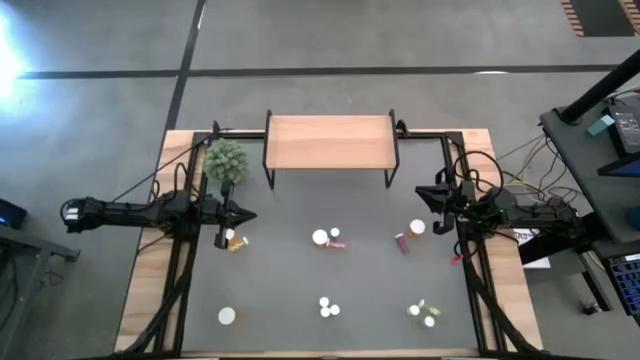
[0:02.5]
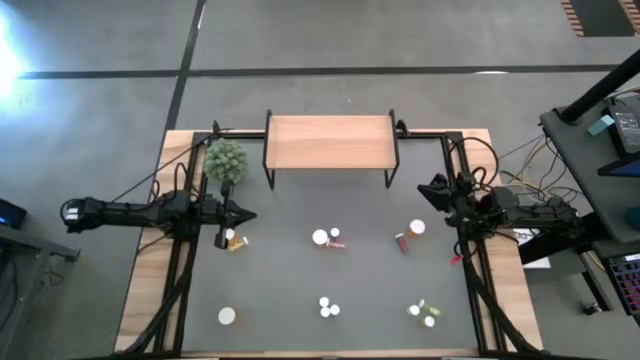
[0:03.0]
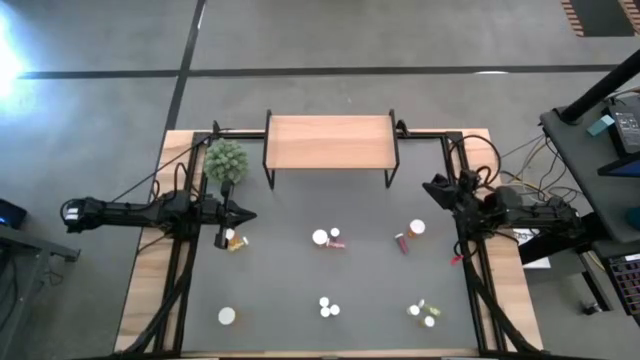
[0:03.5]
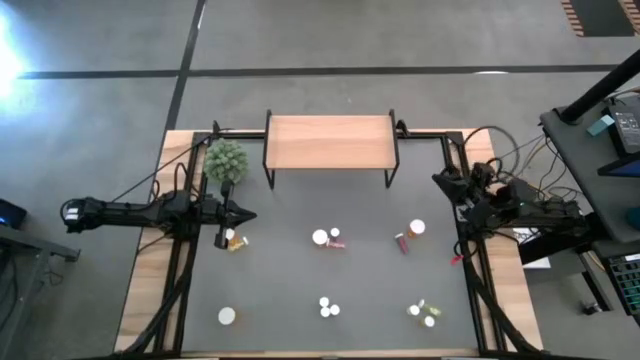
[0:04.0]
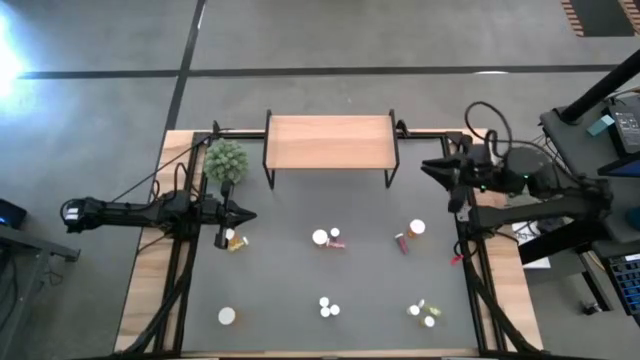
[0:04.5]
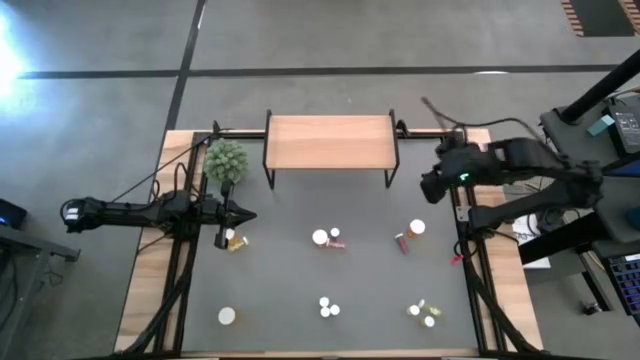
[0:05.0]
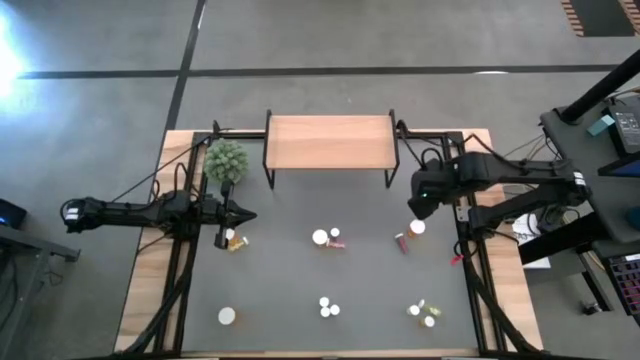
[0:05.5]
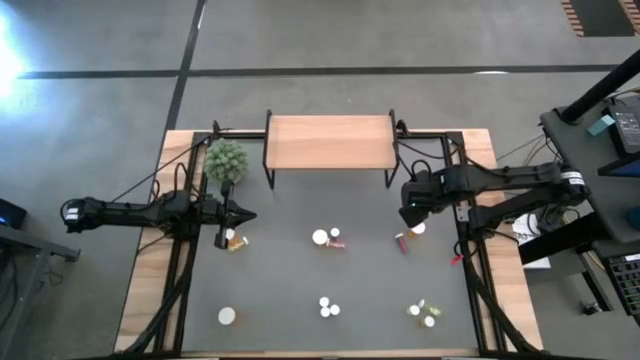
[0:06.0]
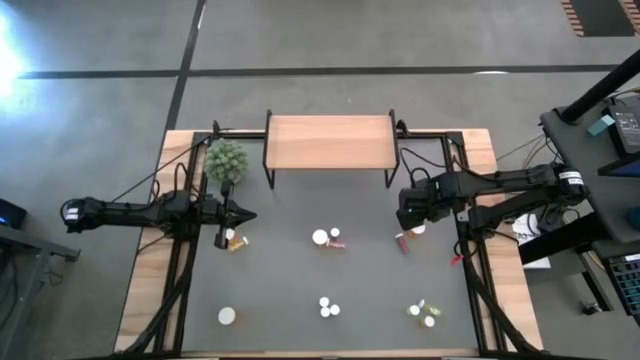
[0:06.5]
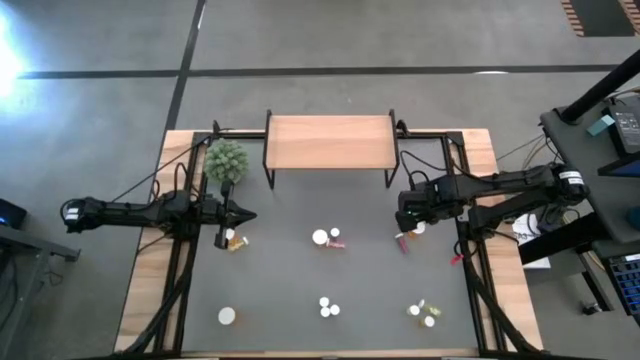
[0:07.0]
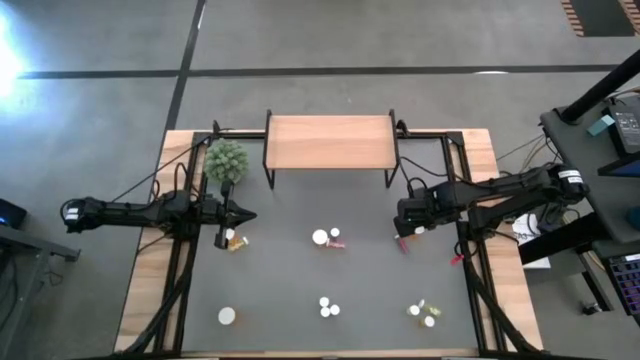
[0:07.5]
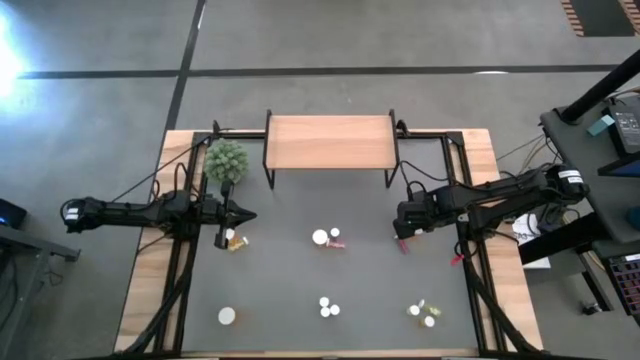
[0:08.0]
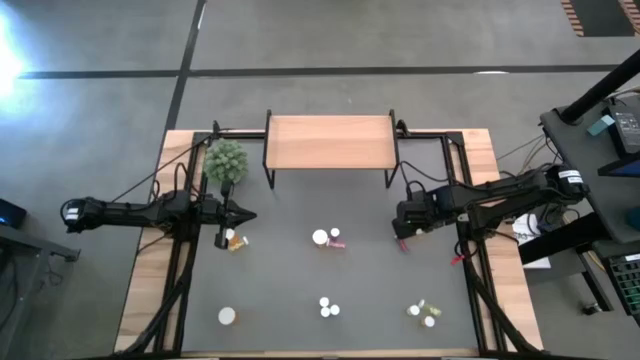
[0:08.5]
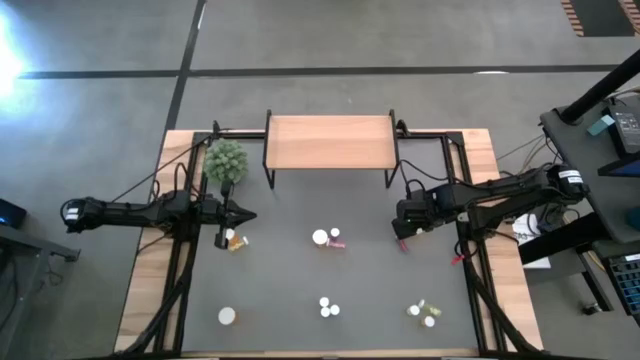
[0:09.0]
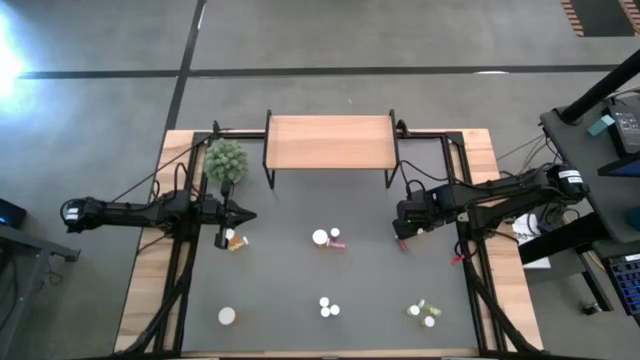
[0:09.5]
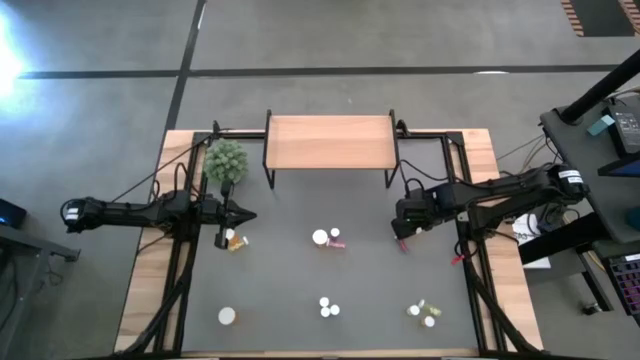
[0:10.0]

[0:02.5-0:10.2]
Task: Pick and place medicine bottles onto shelf by color
Put the large orange pill bottle on the shelf

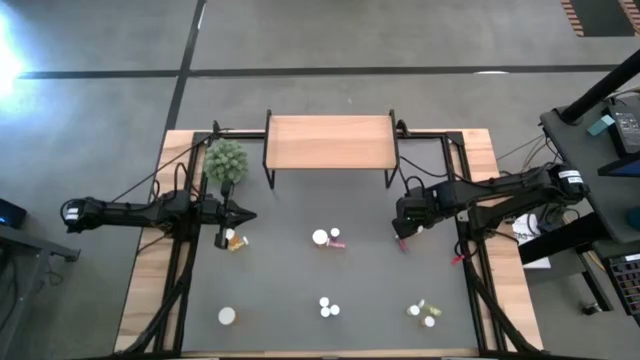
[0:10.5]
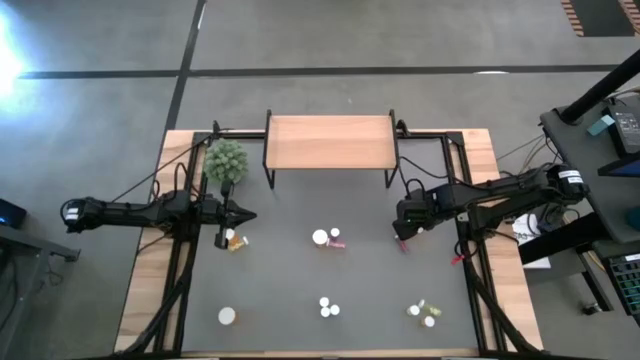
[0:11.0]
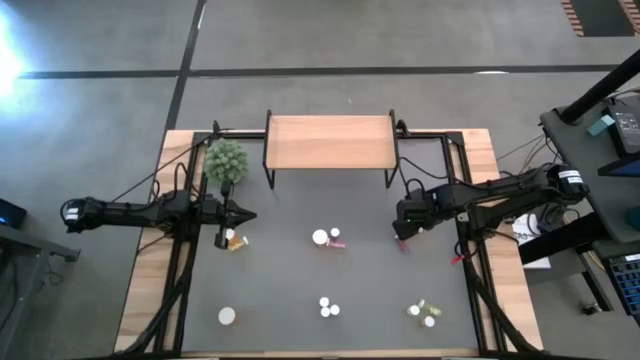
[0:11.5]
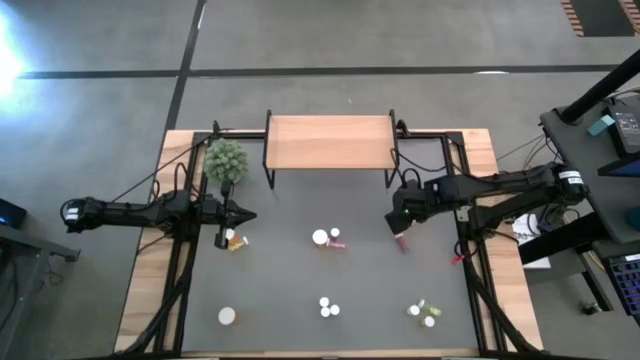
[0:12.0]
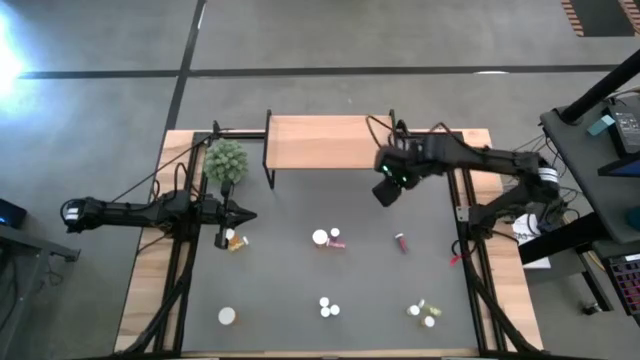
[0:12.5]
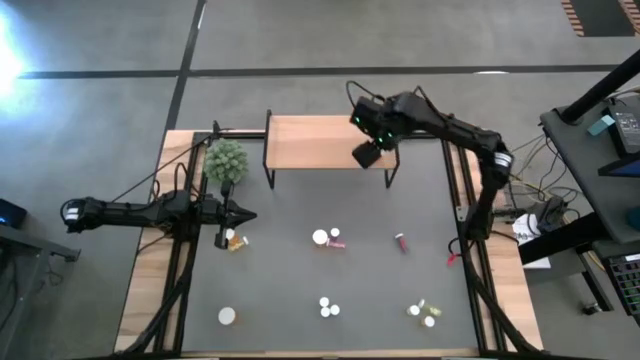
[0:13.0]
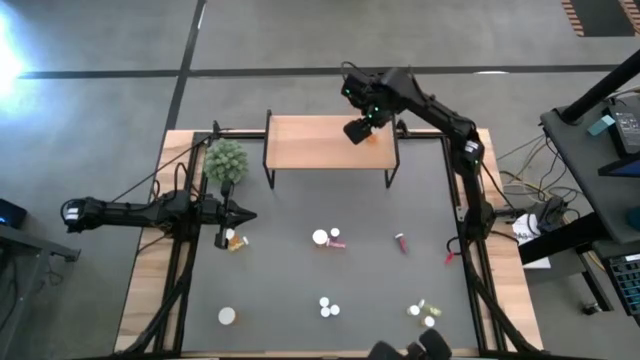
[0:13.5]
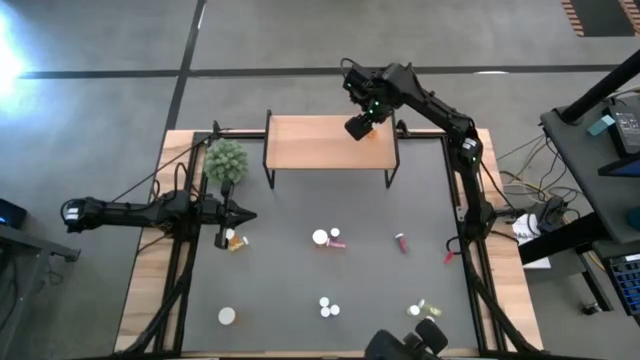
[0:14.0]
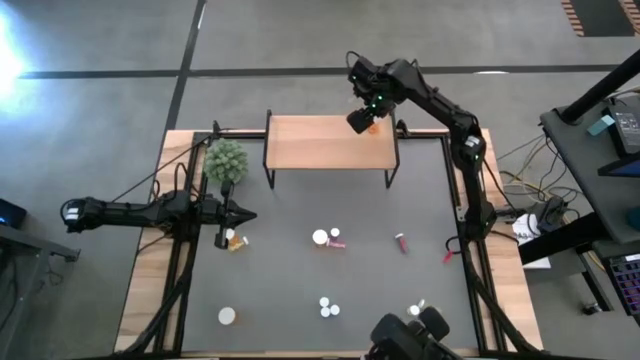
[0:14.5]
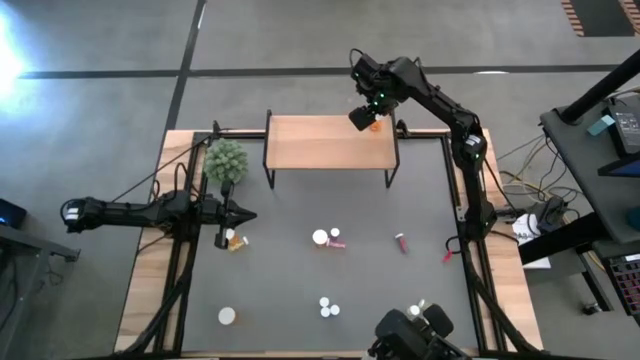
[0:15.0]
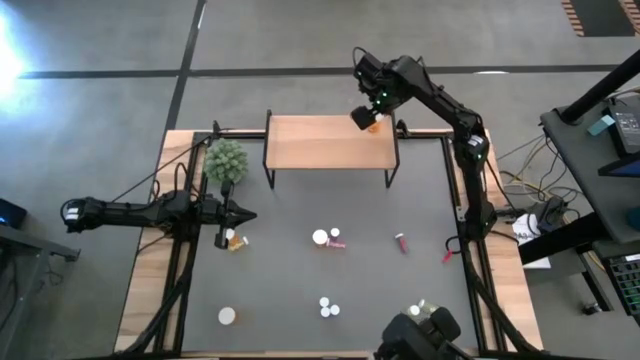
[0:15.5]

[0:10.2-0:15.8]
Put the large orange pill bottle on the shelf

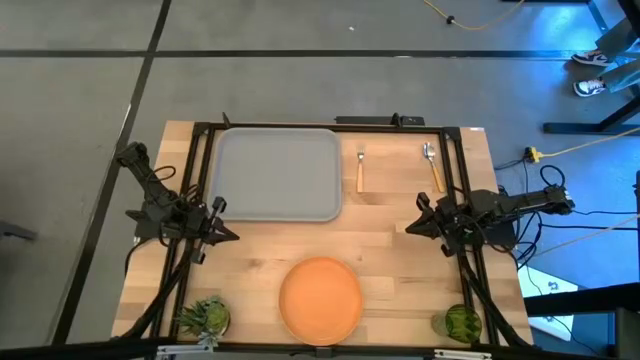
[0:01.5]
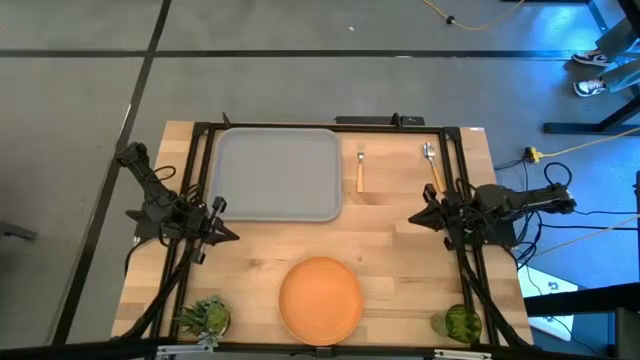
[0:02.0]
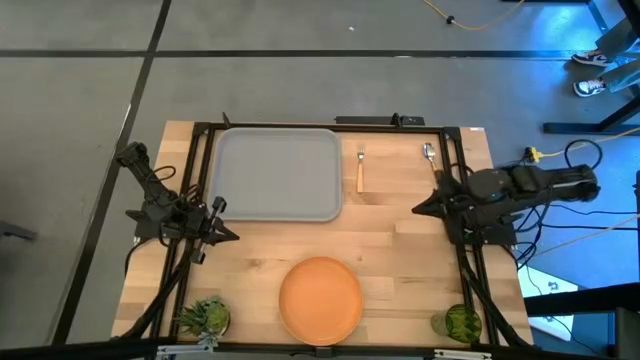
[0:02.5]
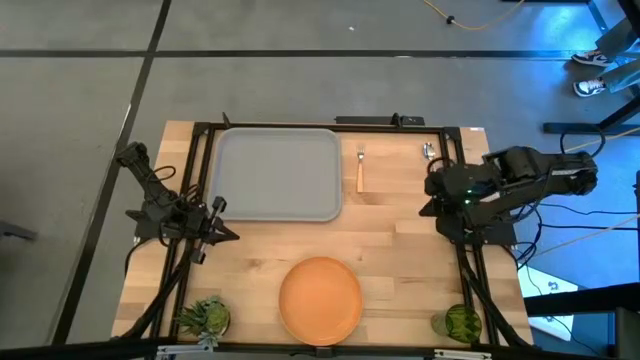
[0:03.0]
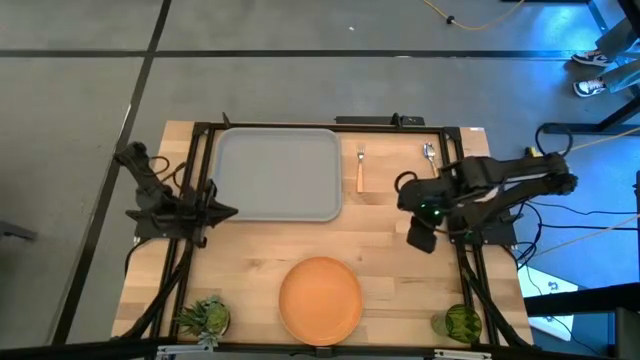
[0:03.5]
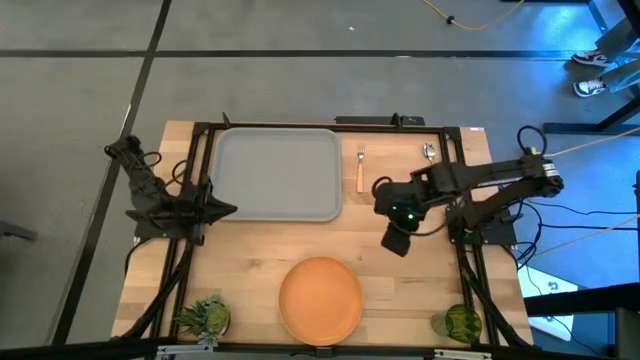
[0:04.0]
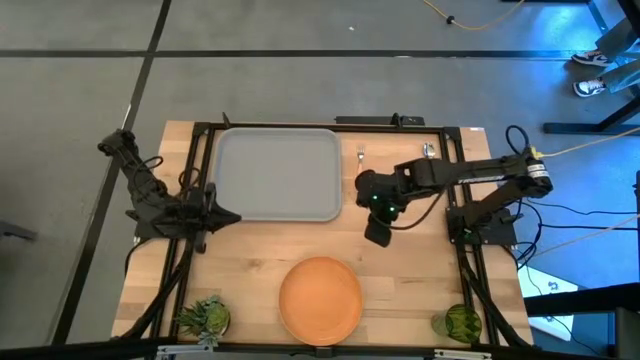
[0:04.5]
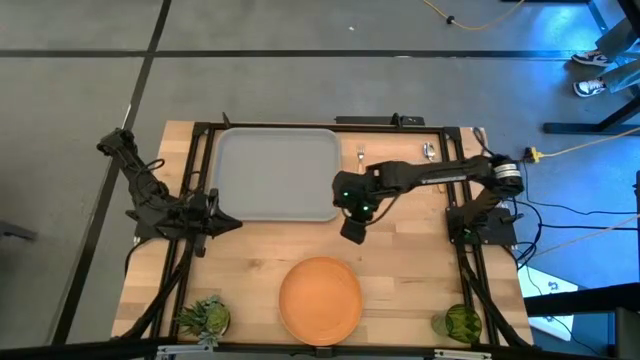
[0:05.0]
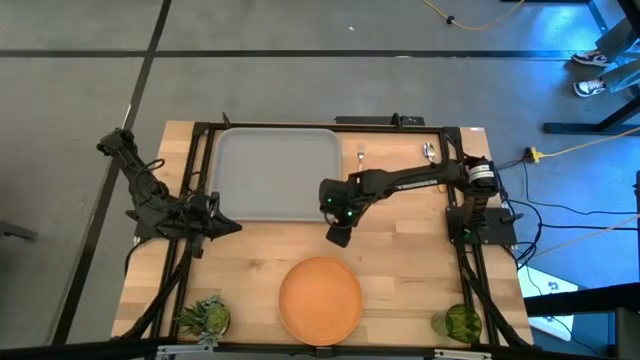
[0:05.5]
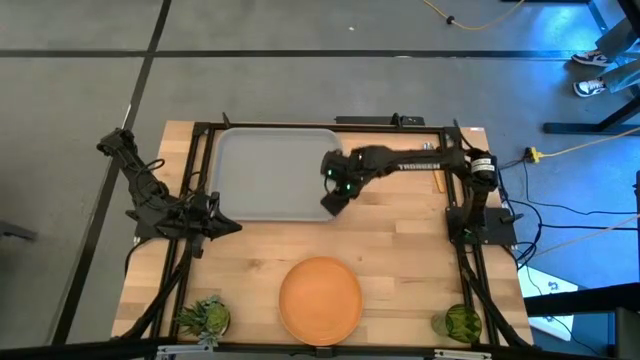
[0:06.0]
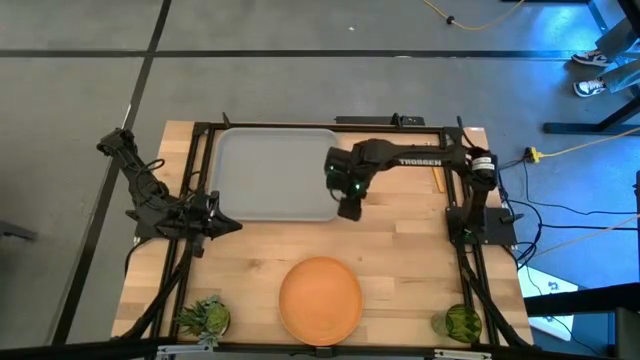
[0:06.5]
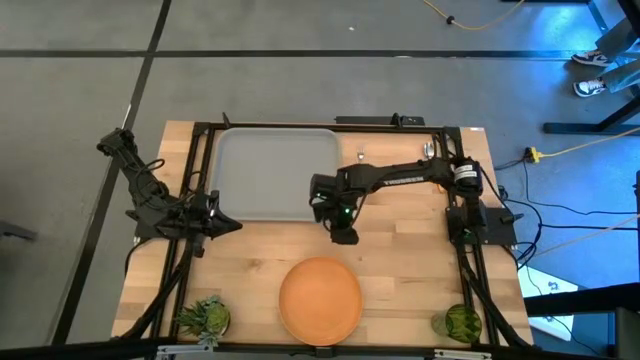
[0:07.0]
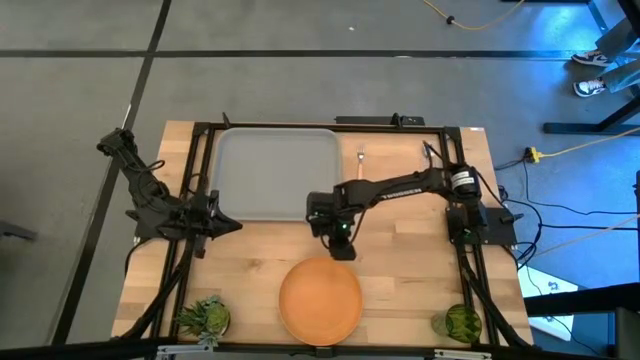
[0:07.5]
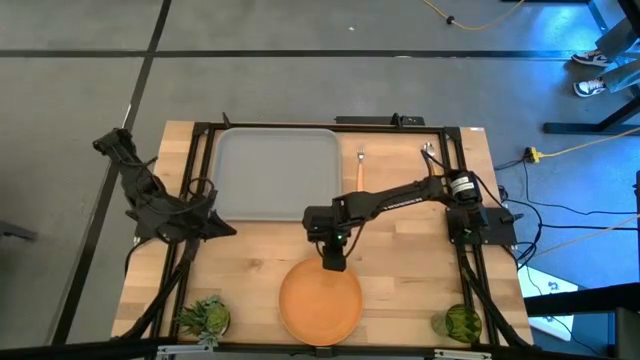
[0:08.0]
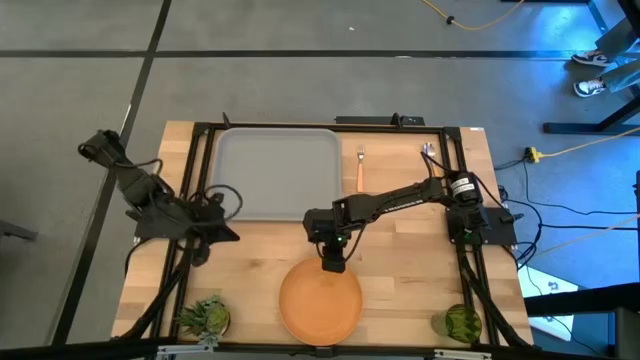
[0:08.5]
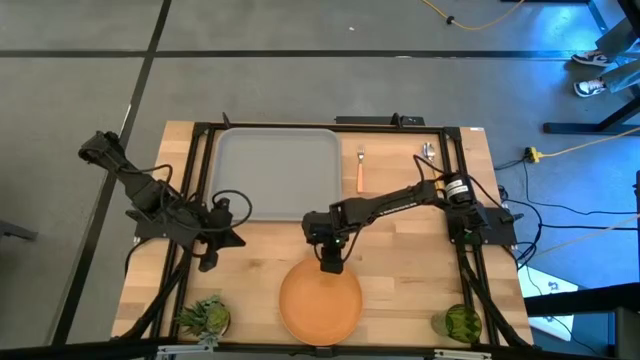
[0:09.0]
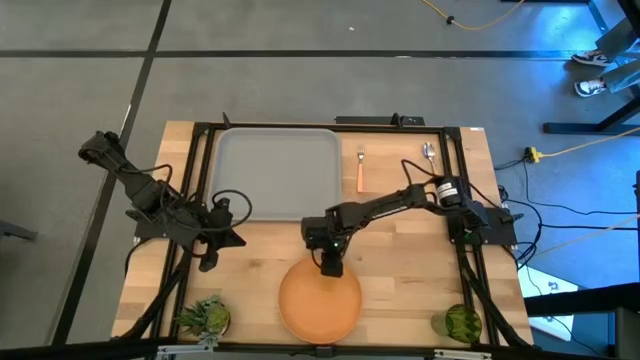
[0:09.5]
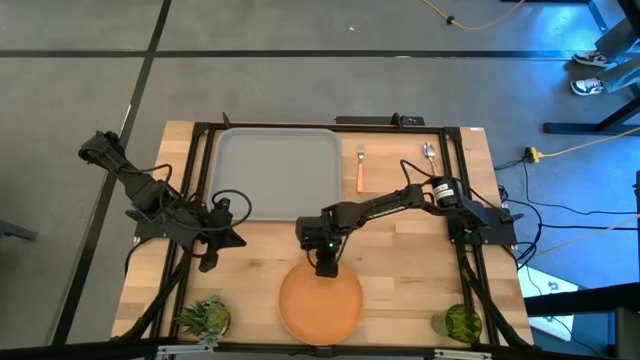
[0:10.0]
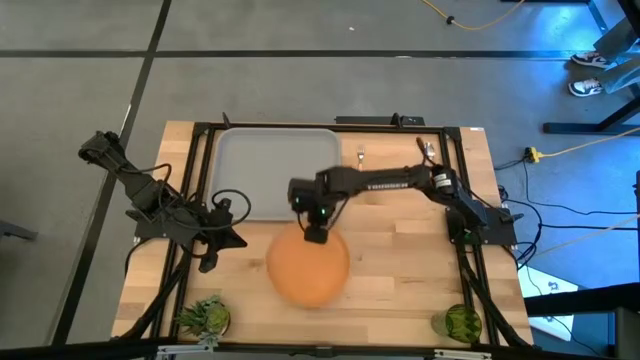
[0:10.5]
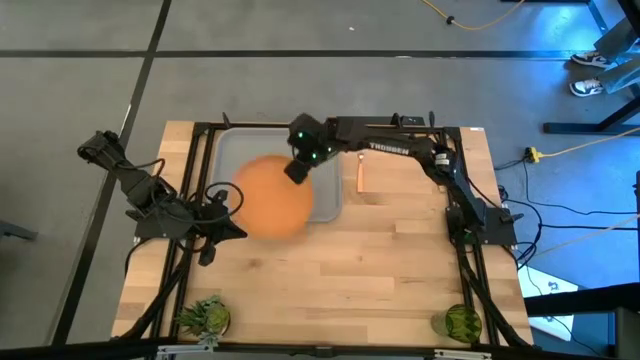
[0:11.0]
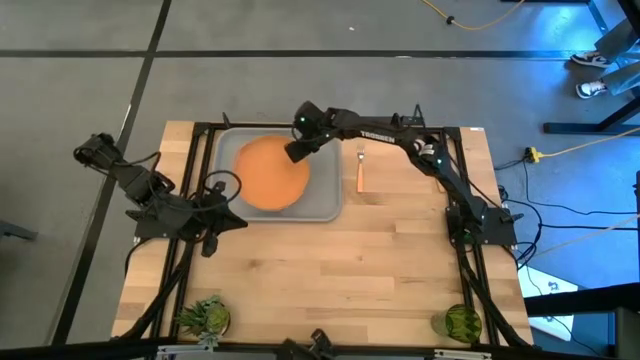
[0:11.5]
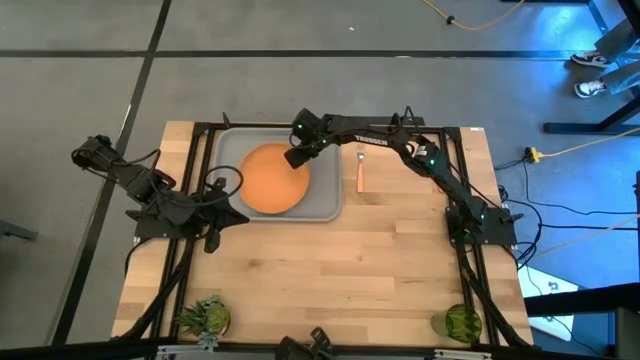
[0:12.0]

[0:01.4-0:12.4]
Task: Pick and place plate/cup/fork/spoon on tray
Put the orange plate on the gray serving tray
